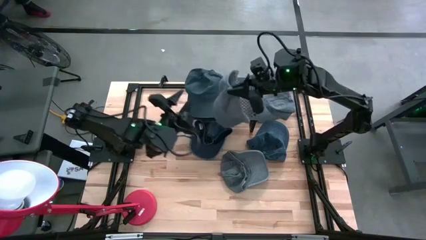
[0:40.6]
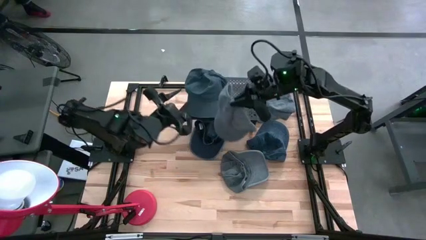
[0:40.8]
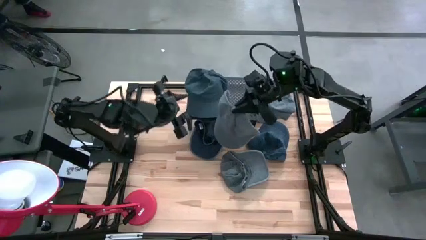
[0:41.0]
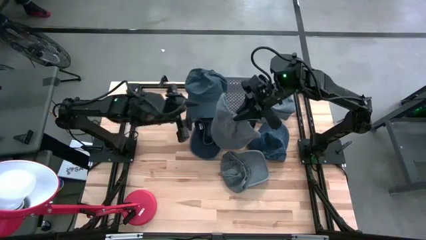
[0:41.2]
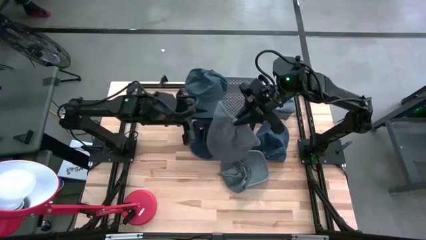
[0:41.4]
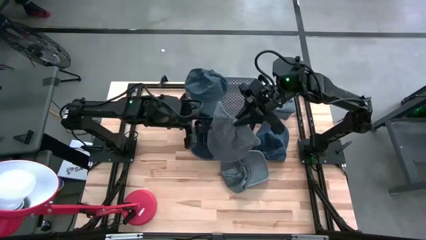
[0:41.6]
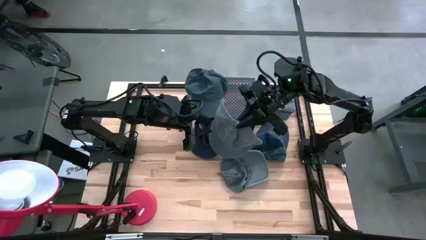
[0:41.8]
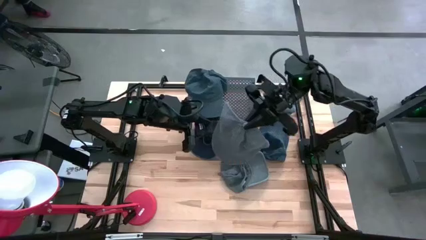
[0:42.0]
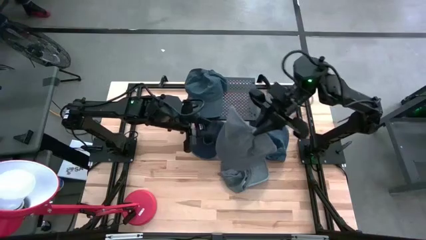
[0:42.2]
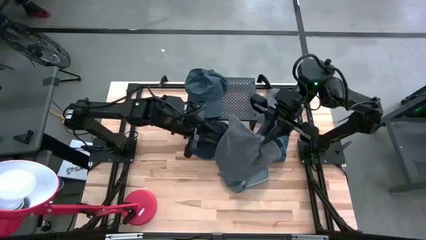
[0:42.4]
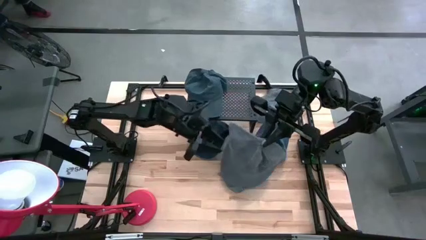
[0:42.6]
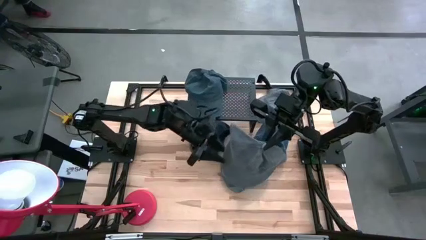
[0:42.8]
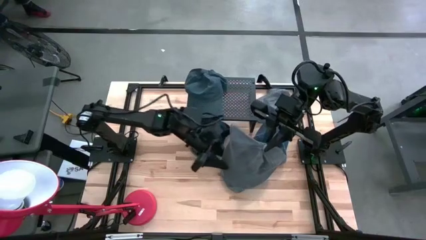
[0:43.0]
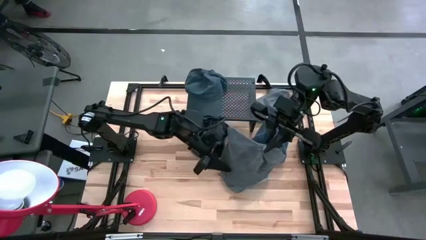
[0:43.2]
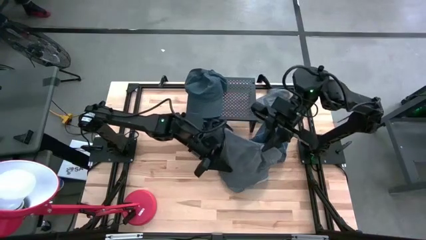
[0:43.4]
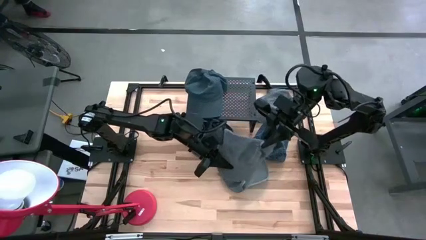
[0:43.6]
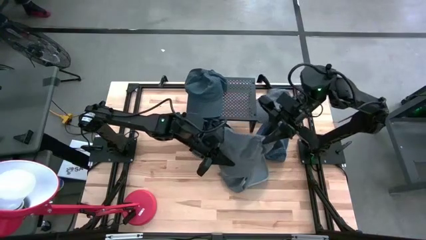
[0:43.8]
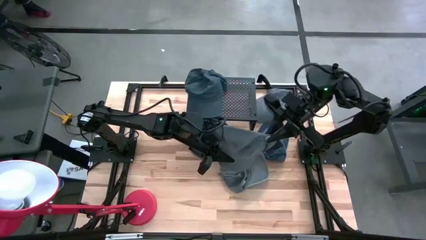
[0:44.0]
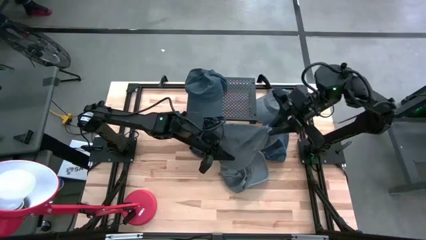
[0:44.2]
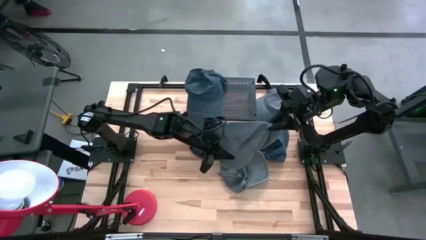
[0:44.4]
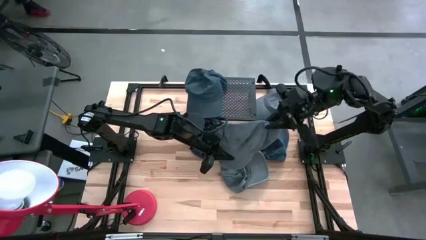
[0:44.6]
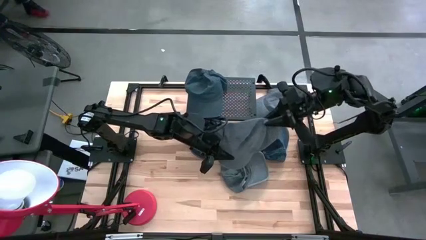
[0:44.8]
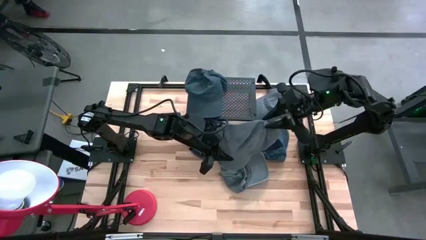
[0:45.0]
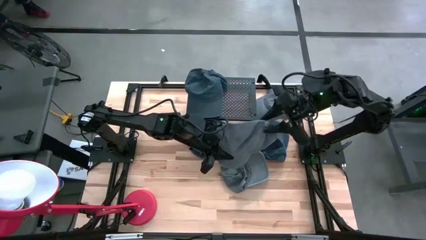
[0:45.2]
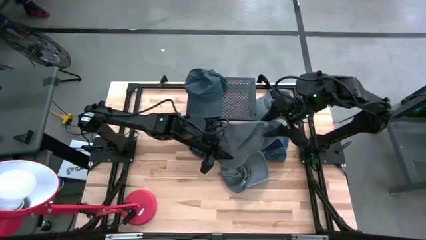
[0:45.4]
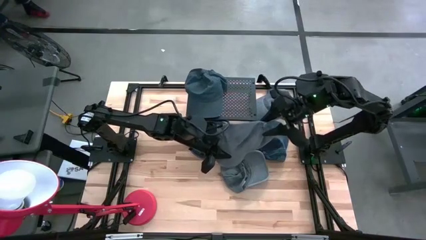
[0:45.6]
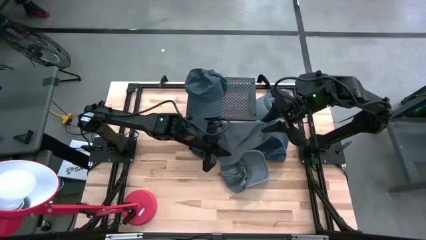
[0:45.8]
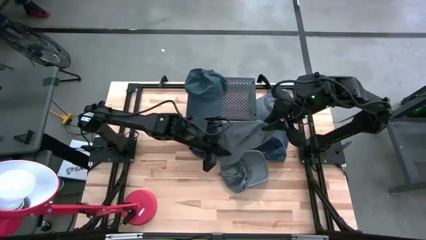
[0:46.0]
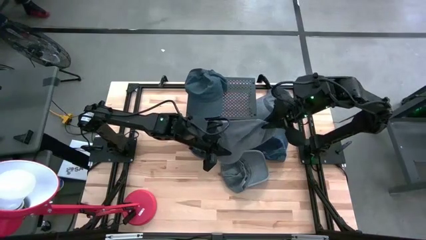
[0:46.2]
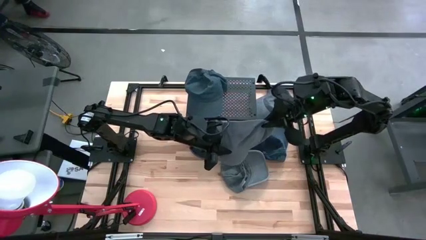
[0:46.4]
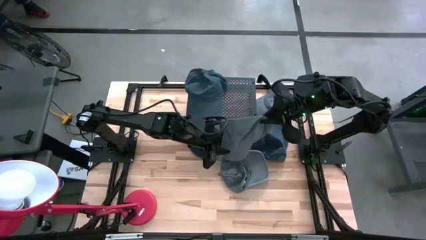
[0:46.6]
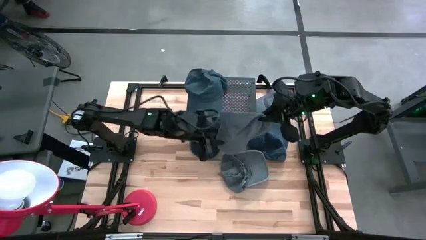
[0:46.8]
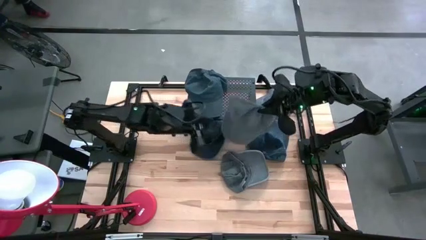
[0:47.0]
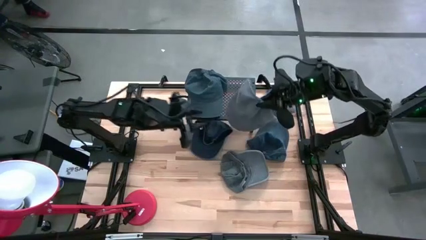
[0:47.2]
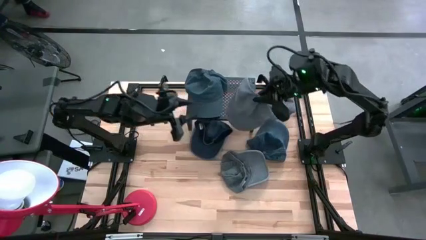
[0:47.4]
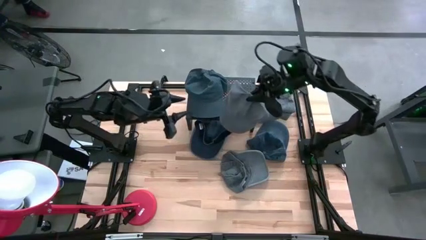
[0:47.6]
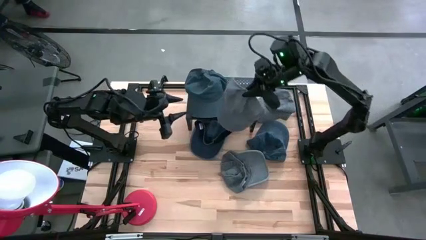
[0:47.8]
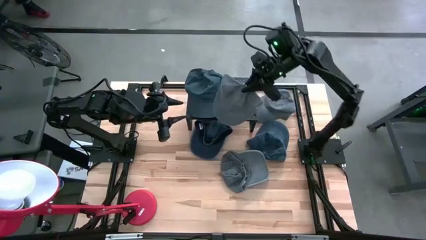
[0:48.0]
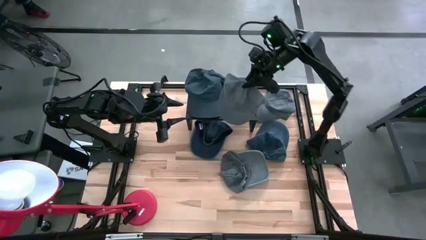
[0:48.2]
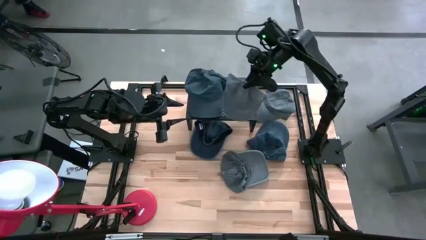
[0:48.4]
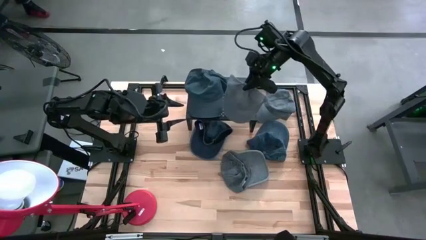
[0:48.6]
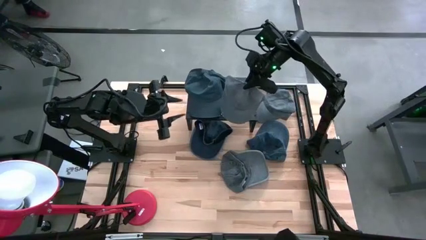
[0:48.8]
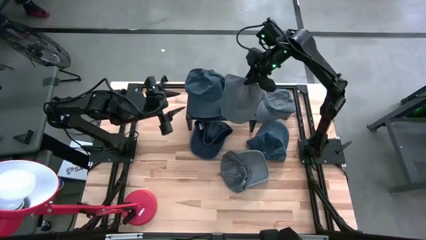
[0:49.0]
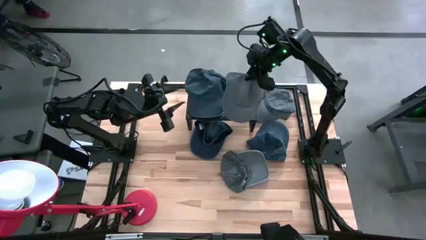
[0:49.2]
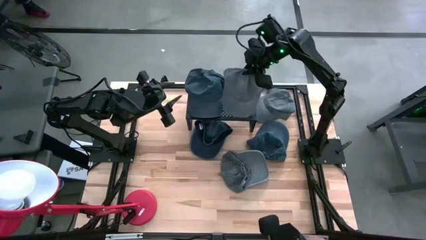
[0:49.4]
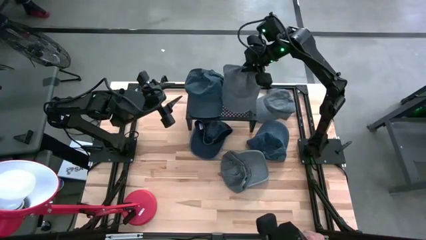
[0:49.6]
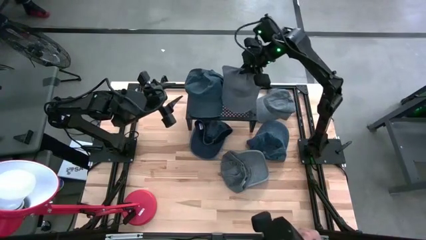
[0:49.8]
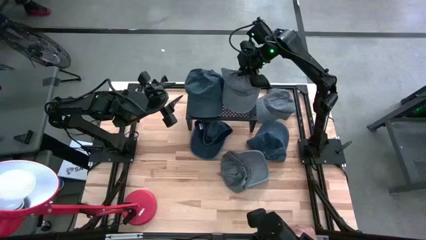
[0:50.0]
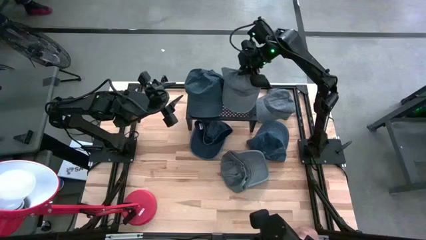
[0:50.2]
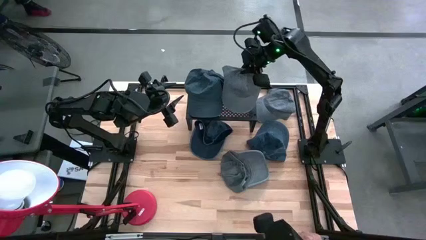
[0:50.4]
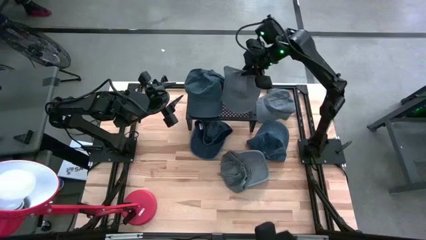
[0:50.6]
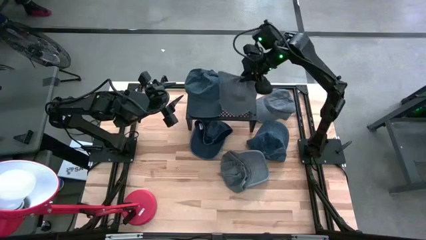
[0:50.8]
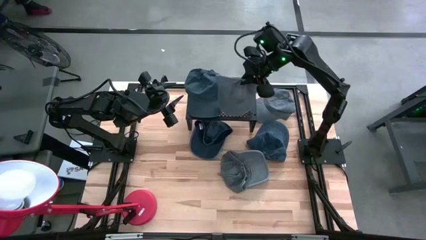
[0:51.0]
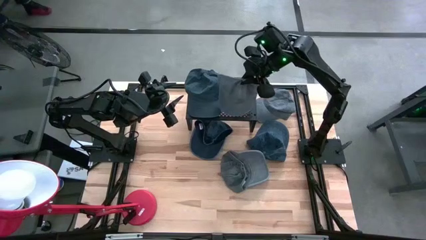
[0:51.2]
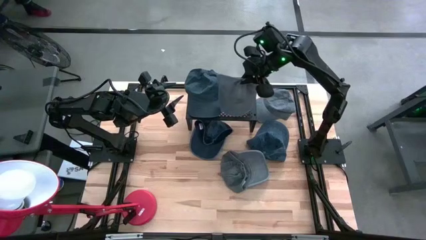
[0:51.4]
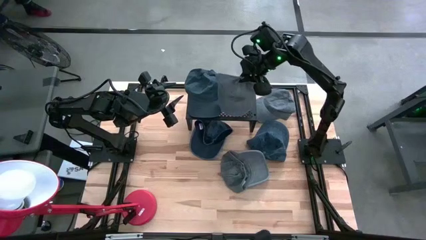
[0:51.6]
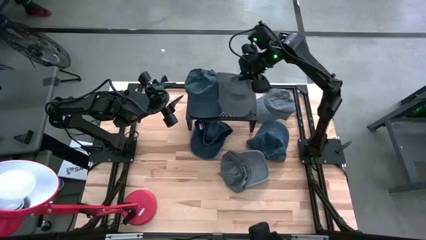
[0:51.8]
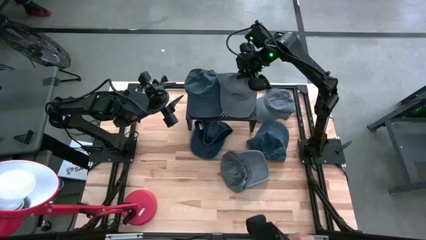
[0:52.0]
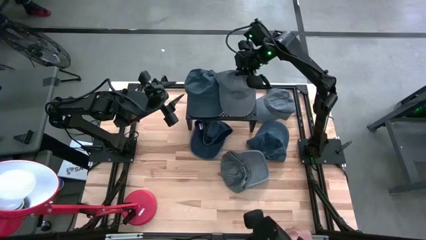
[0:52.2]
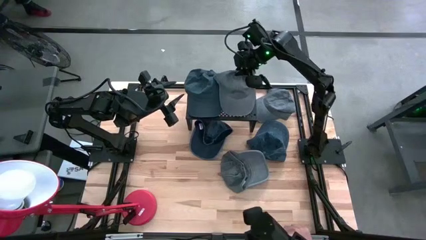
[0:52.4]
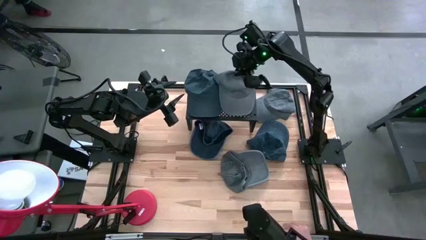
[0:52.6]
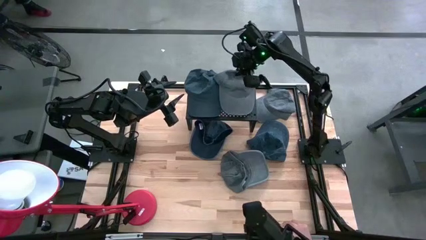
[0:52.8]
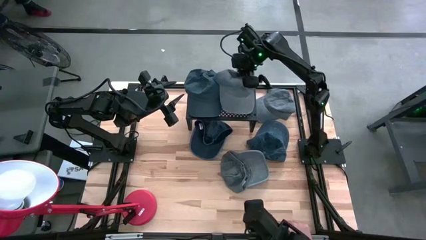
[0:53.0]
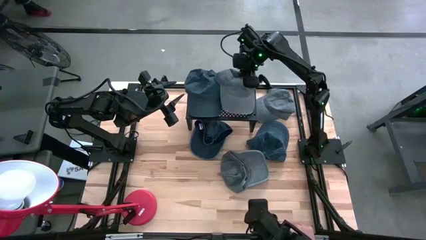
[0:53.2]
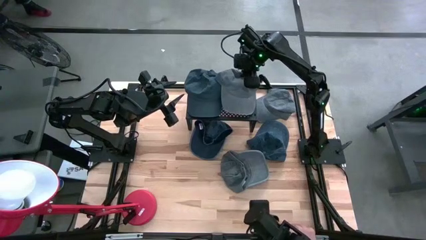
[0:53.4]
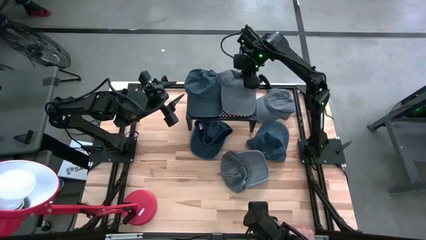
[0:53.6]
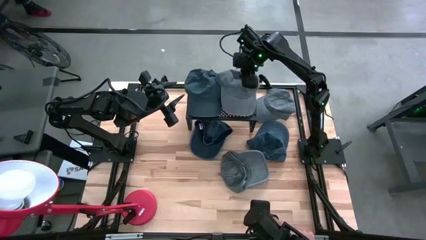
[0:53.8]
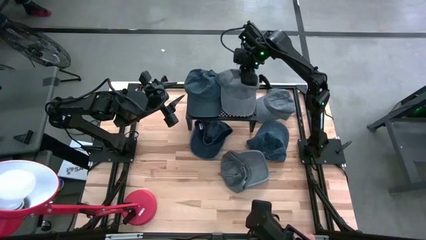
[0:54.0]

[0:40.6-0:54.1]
Task: Pick & Place hat
Put the bottom left gray cap on the shelf

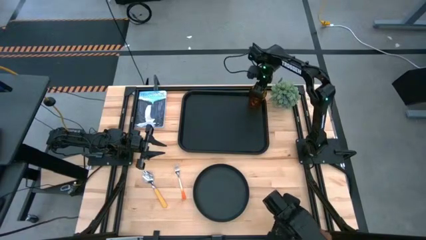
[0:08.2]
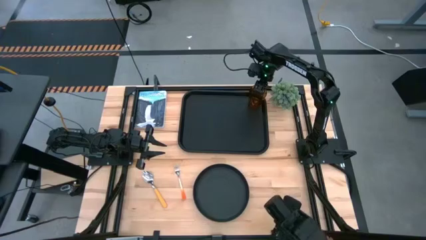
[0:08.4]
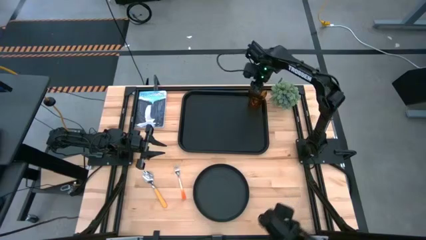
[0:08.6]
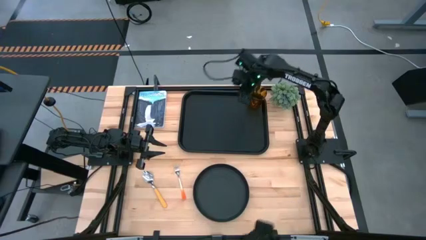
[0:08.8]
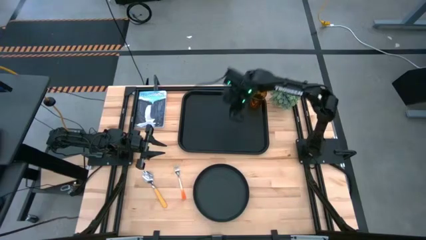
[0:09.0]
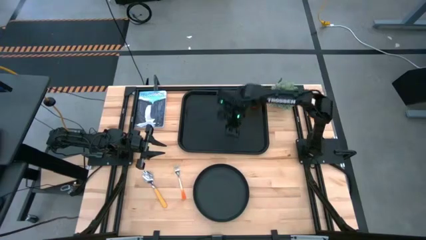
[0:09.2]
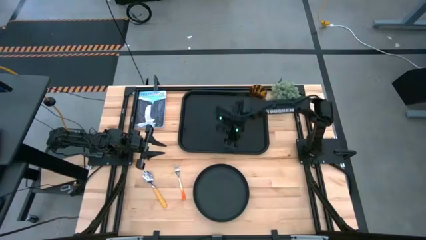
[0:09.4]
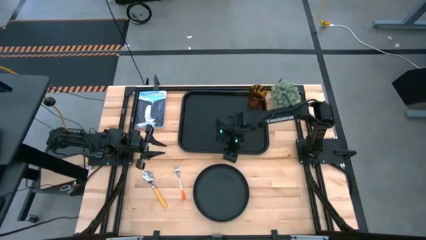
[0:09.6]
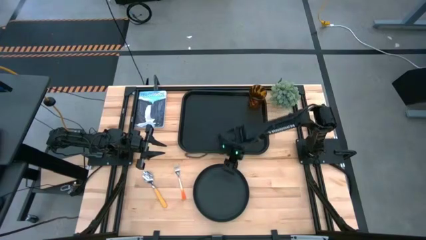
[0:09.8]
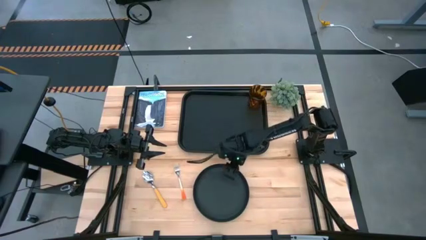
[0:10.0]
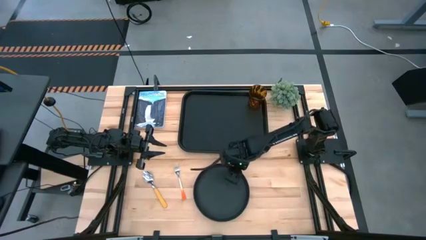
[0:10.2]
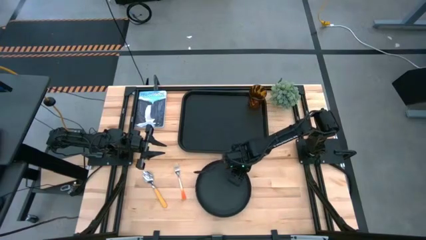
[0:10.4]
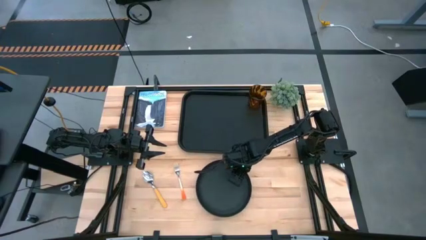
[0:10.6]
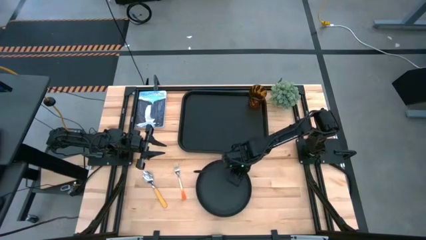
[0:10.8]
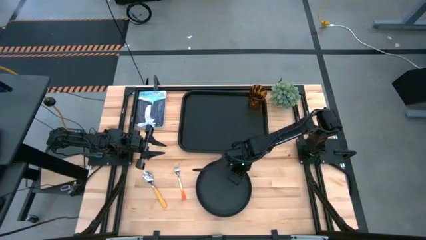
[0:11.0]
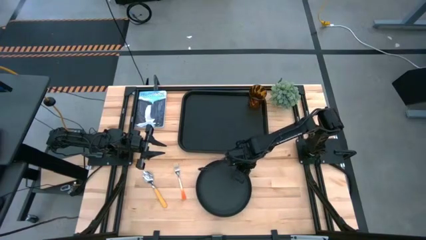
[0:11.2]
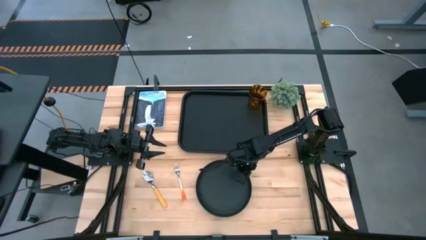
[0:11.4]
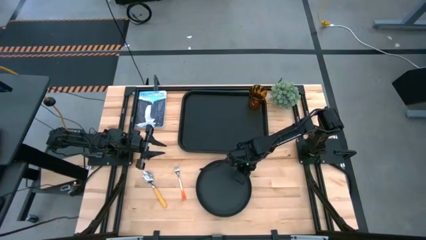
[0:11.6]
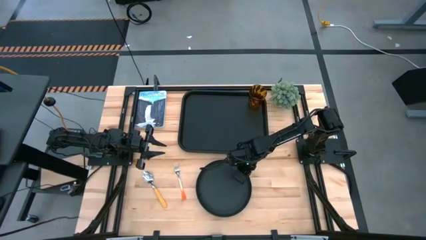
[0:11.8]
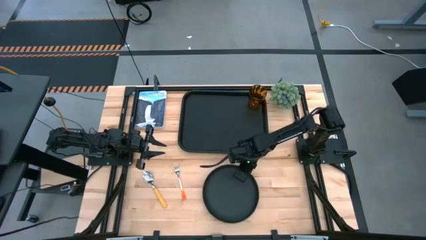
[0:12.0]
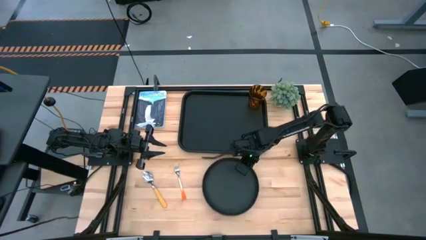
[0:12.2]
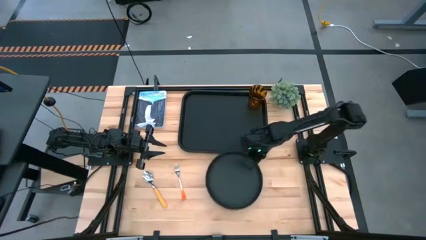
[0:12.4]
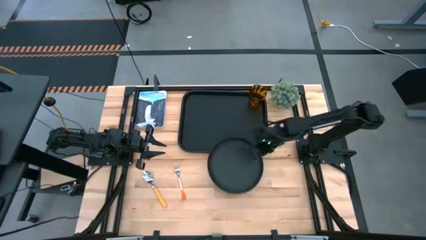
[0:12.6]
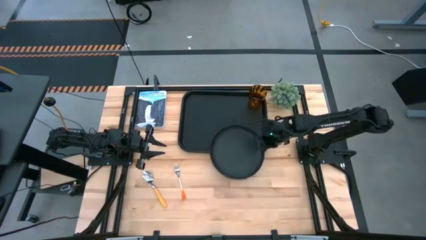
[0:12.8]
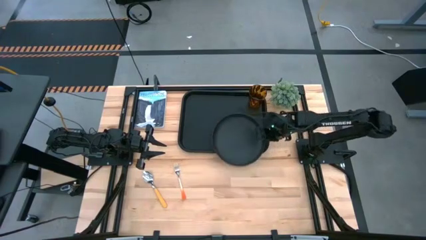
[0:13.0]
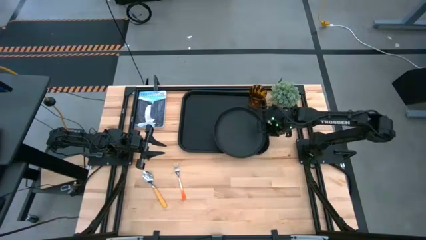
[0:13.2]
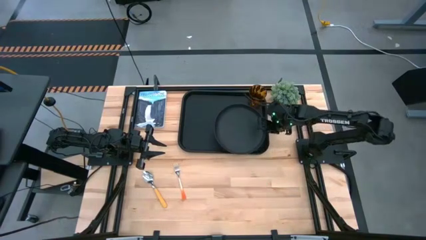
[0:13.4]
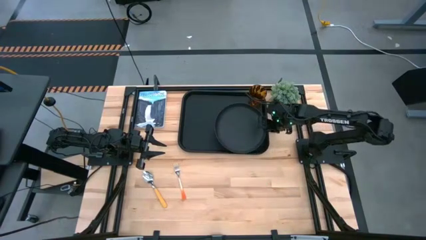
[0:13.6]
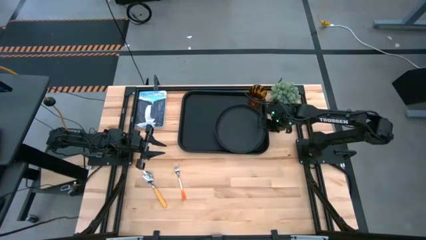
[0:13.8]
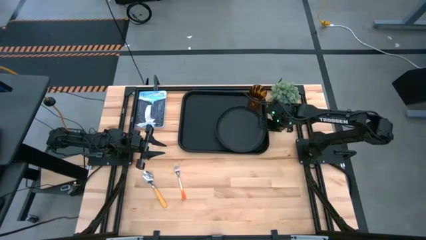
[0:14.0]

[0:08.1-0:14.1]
Task: Pick and place plate/cup/fork/spoon on tray
Put the black plate on the black serving tray to the bottom of the brown cup
